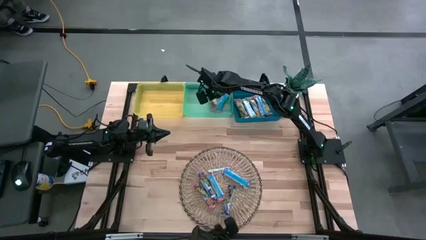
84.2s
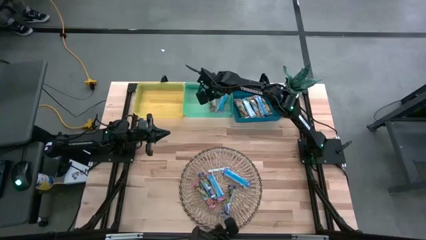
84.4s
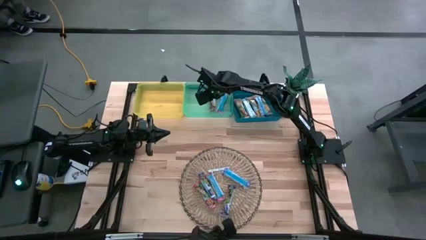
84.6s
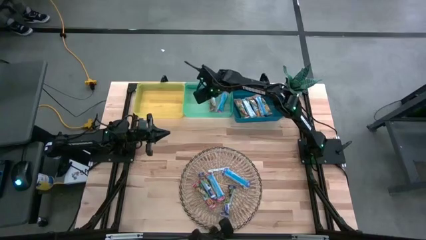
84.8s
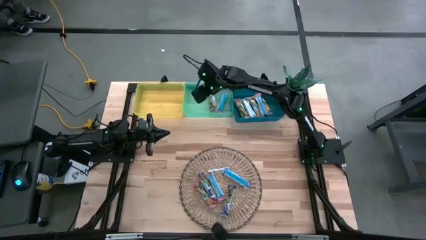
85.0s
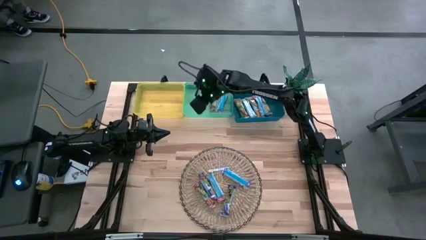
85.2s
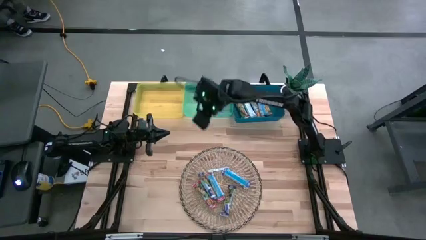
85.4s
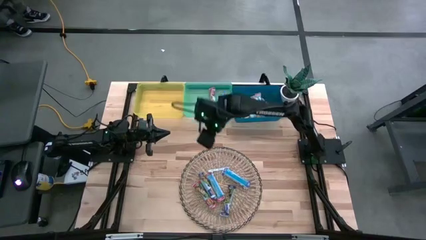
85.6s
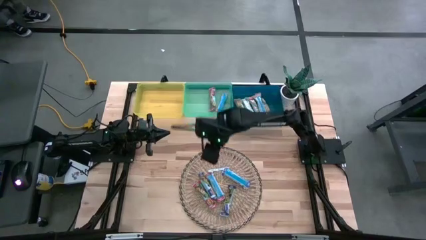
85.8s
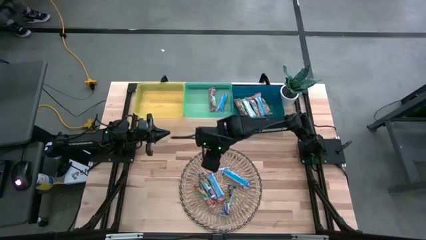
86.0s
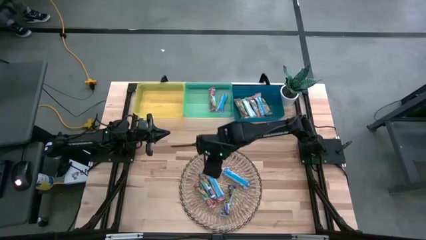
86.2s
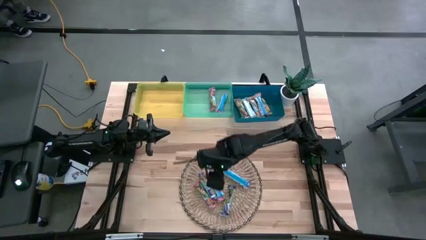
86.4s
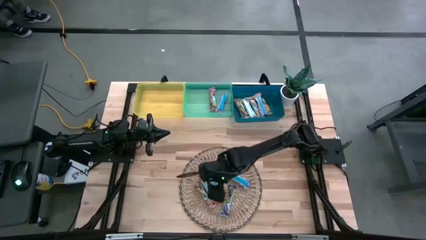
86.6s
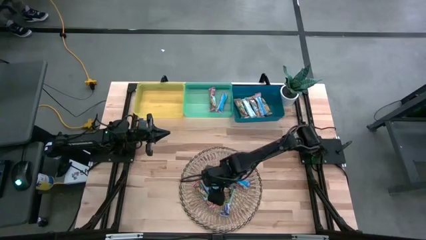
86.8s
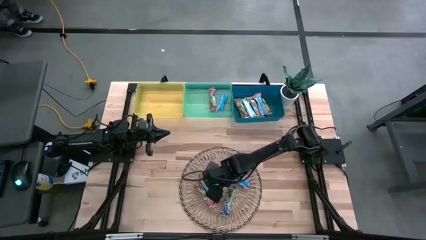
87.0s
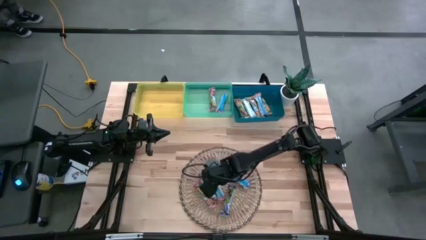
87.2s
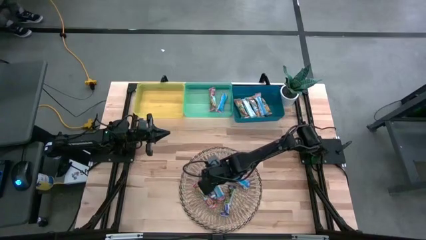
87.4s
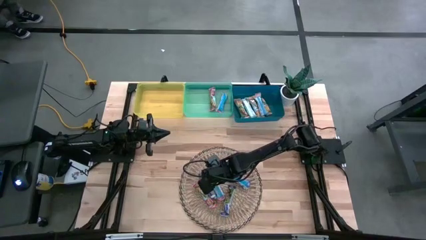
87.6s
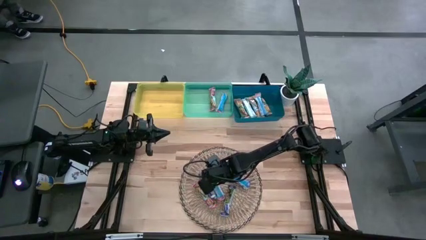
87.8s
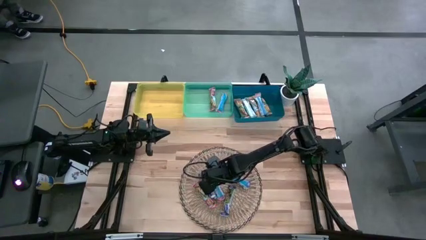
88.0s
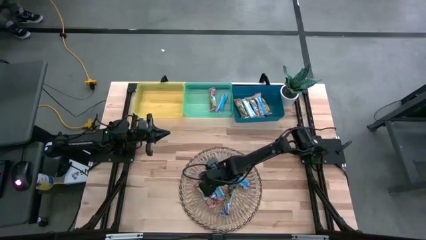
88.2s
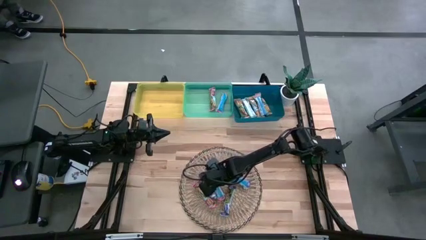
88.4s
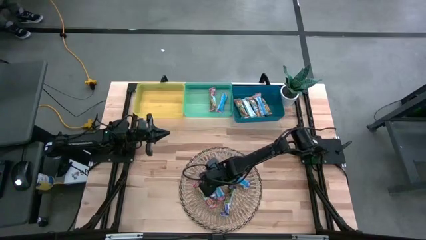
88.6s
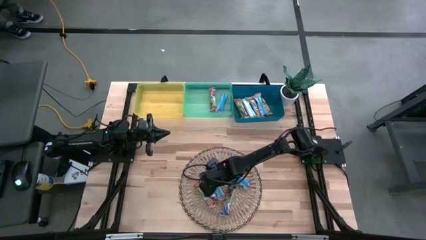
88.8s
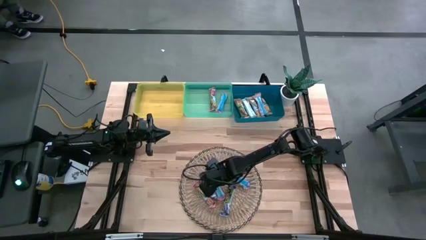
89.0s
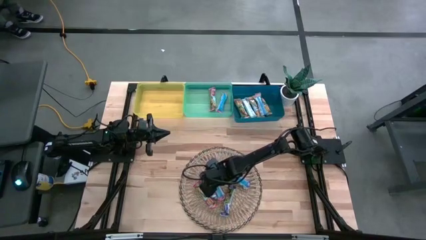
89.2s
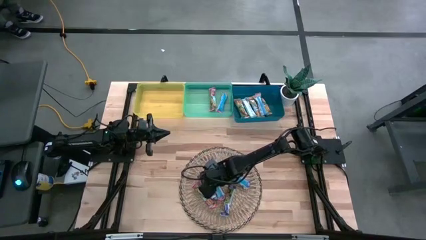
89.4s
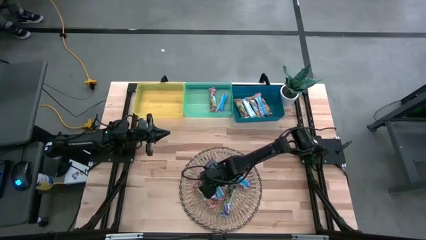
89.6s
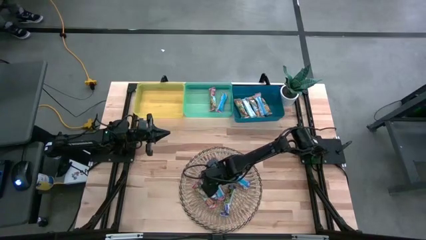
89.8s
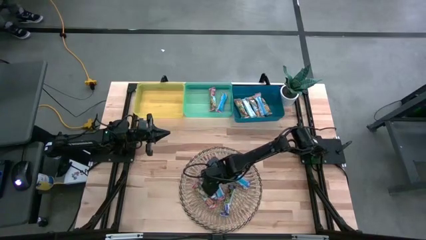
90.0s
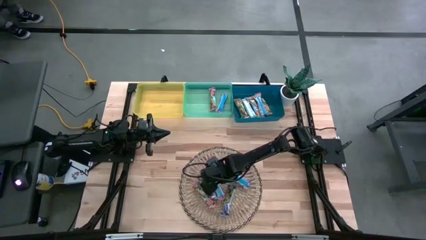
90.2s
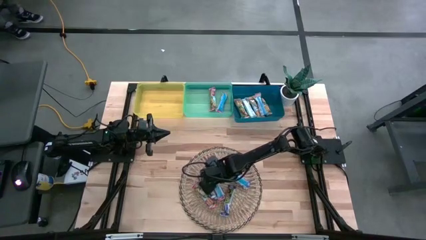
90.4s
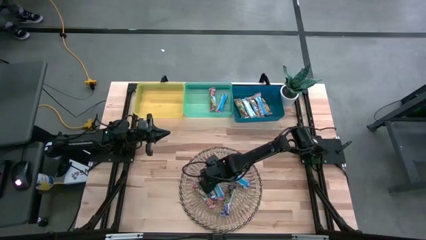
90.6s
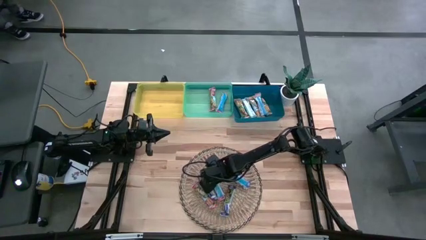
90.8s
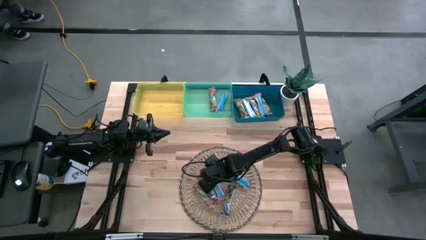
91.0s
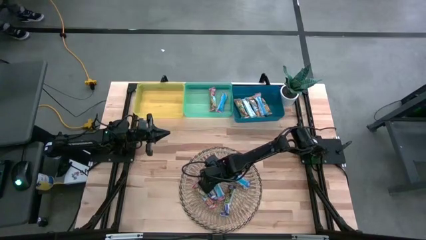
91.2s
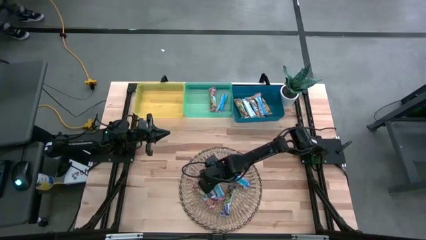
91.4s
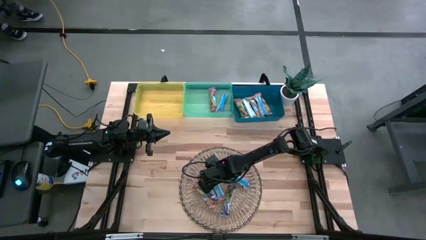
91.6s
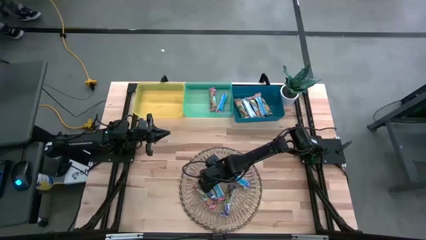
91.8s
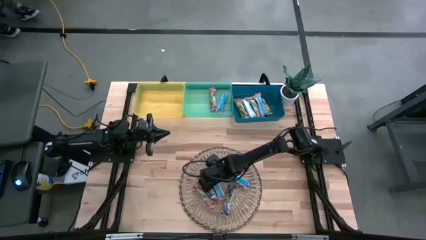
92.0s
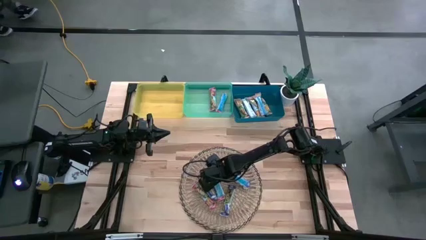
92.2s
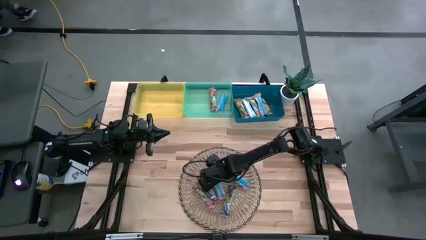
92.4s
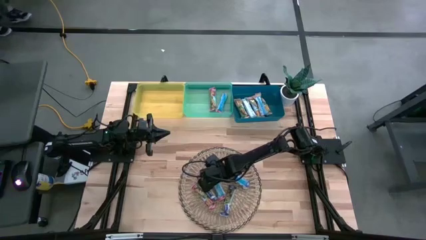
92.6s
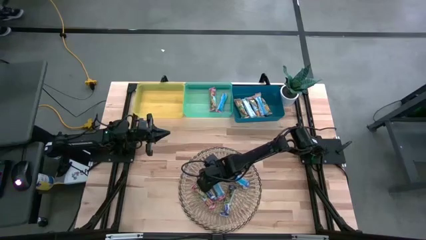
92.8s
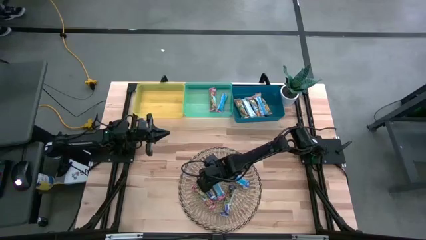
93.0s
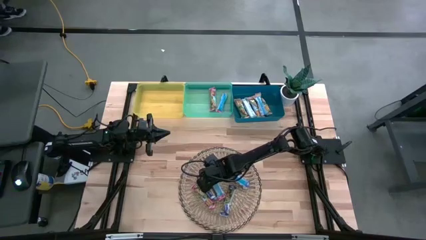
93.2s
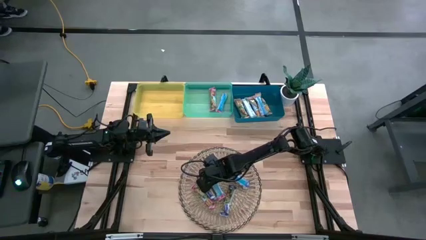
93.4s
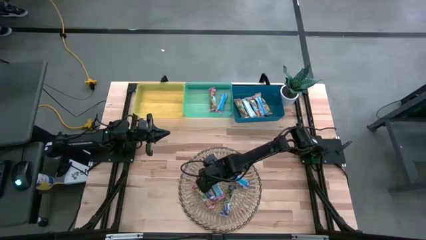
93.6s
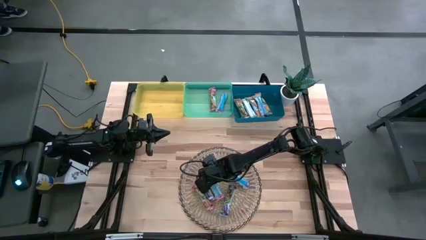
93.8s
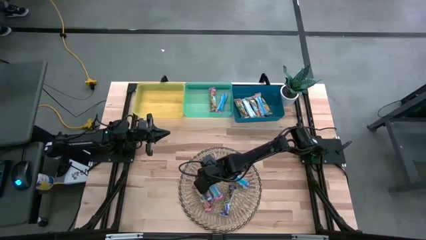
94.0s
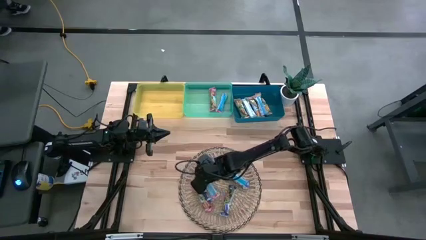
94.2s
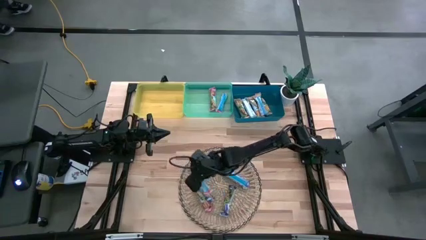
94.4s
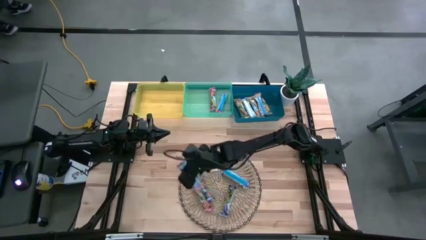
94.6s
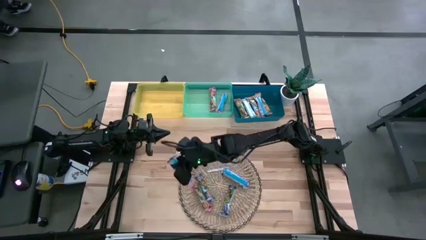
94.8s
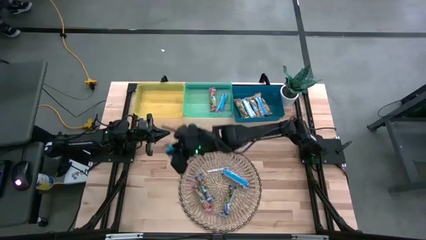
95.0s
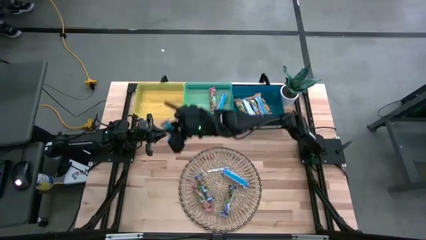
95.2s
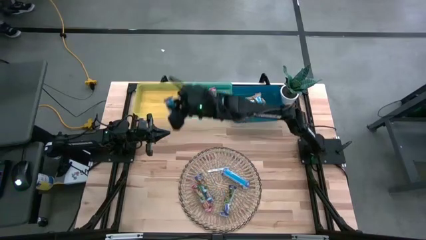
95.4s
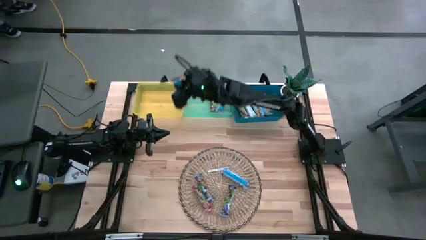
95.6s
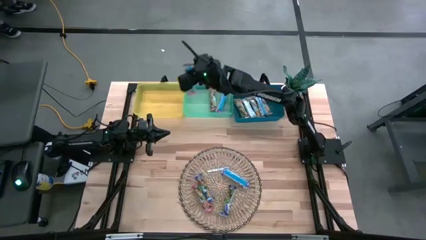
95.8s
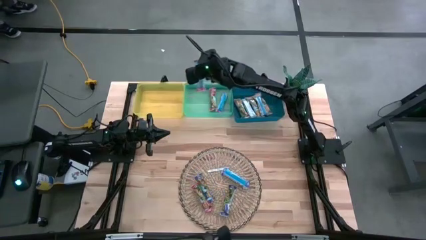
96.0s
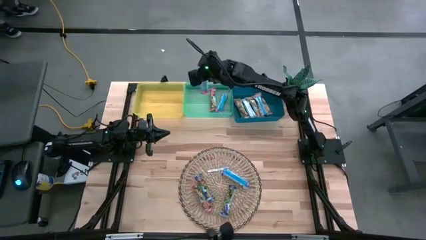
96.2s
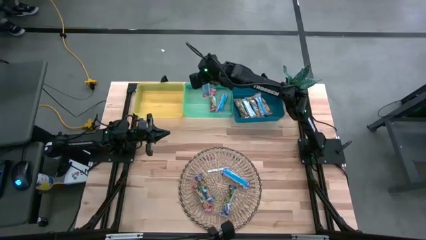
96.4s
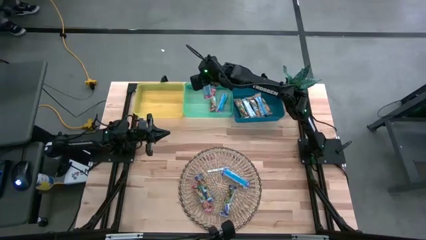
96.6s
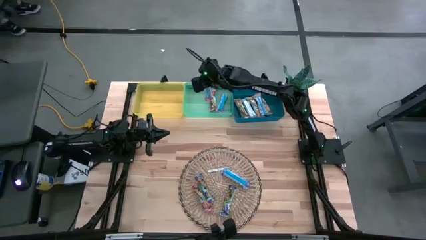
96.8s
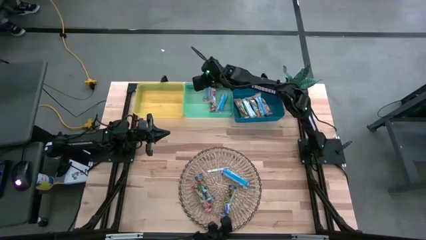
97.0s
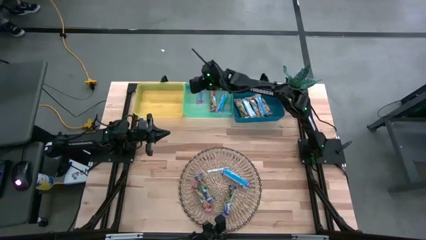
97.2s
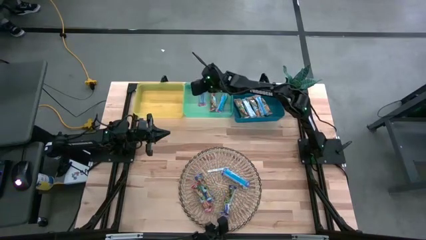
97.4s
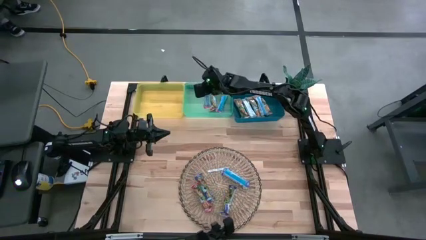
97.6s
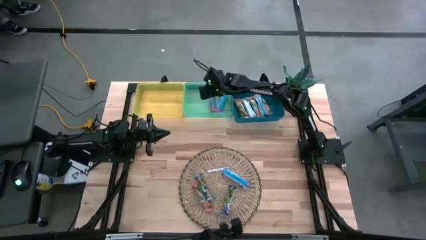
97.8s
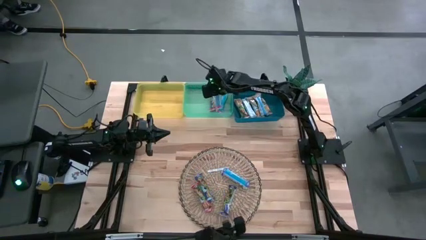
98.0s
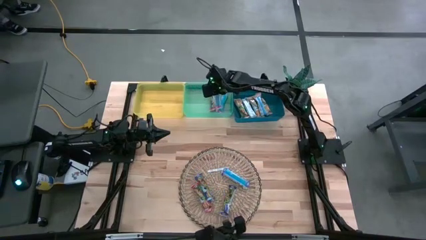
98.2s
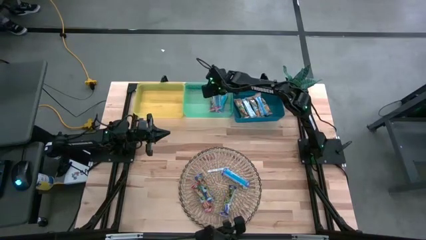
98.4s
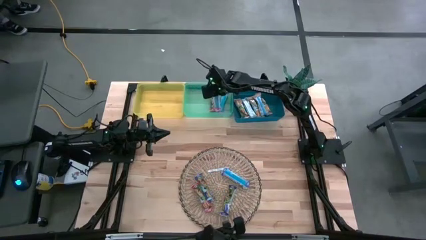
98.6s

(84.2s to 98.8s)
Task: Pick and place Granola Bars by type
Put the red granola bar into the light green bin
